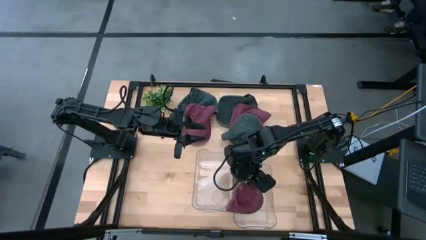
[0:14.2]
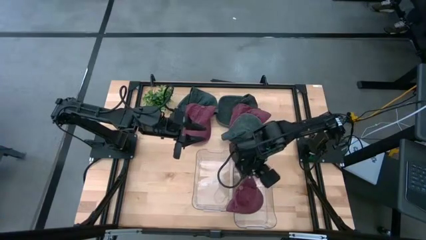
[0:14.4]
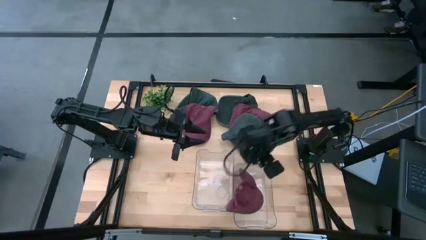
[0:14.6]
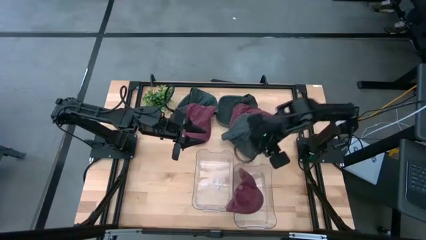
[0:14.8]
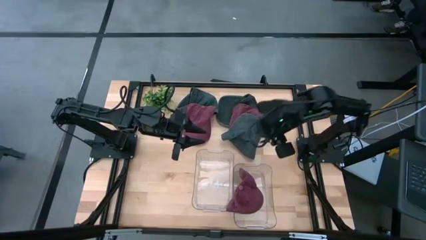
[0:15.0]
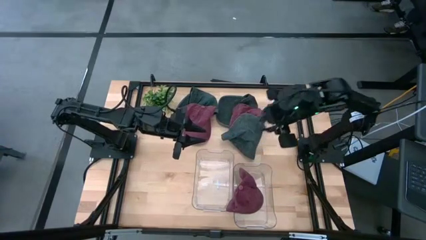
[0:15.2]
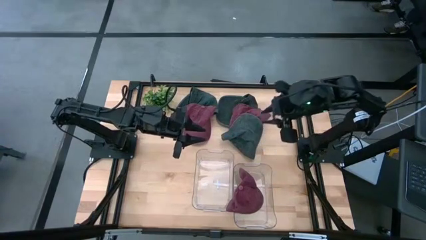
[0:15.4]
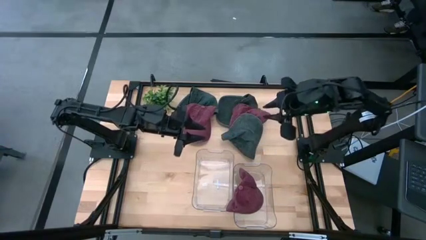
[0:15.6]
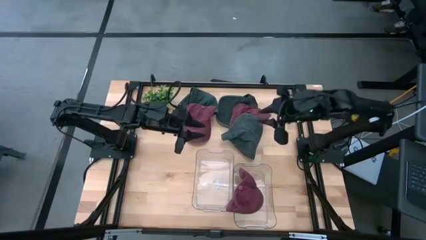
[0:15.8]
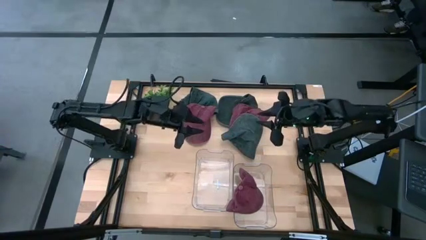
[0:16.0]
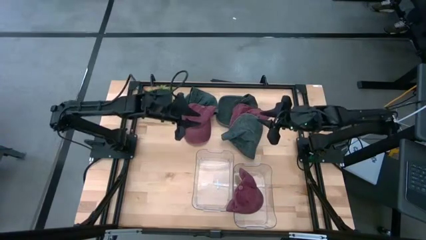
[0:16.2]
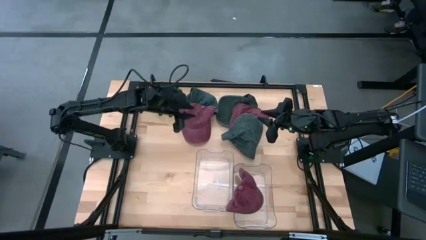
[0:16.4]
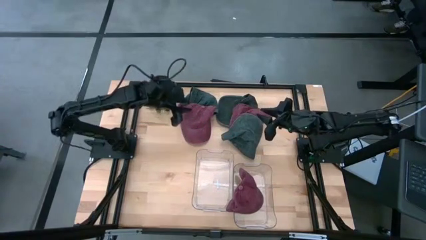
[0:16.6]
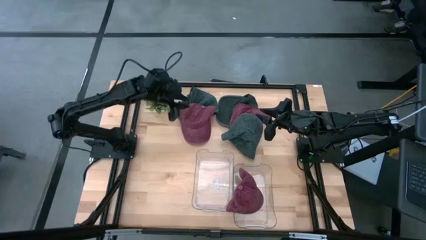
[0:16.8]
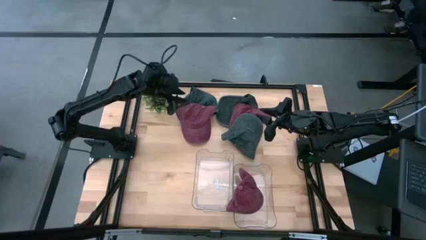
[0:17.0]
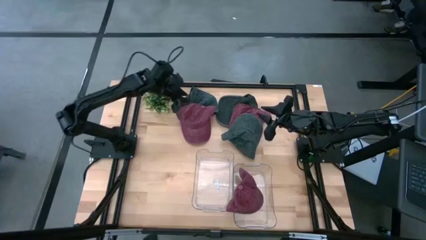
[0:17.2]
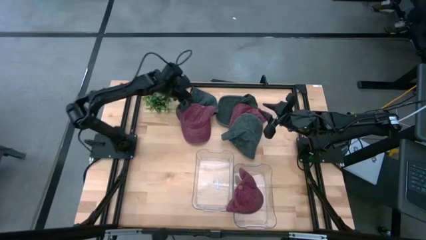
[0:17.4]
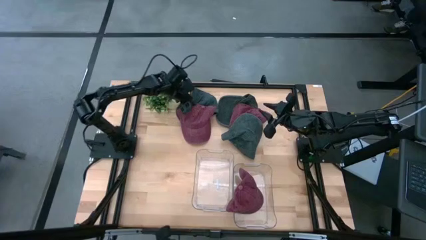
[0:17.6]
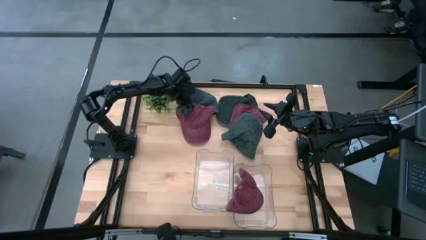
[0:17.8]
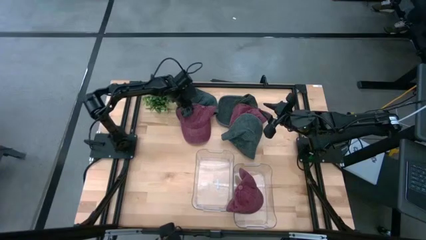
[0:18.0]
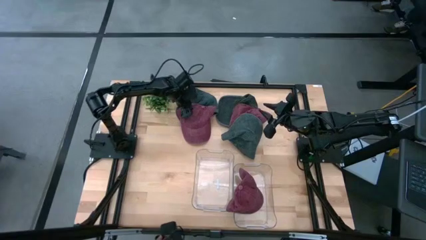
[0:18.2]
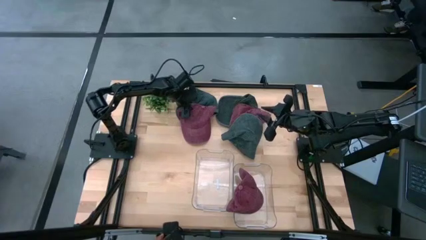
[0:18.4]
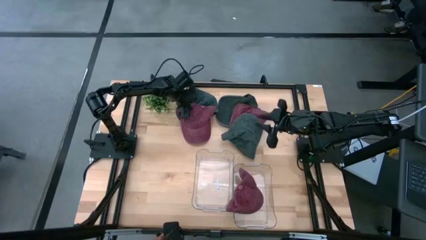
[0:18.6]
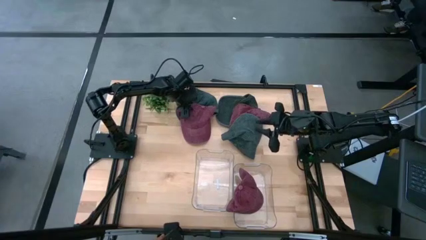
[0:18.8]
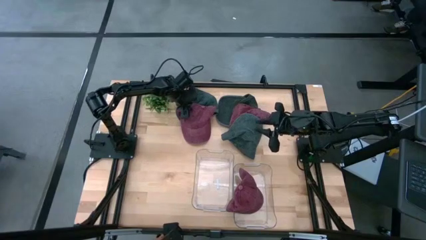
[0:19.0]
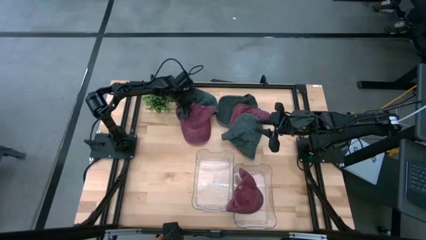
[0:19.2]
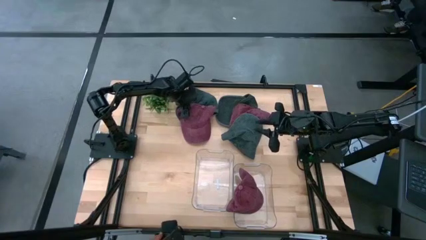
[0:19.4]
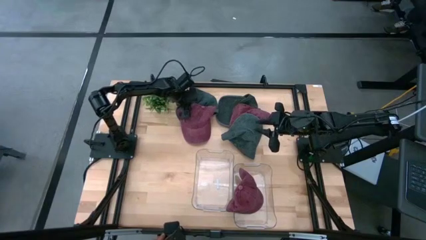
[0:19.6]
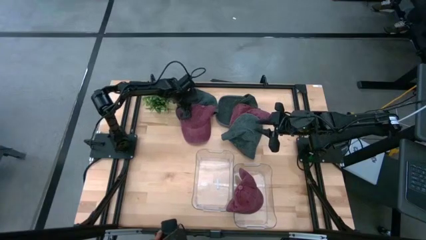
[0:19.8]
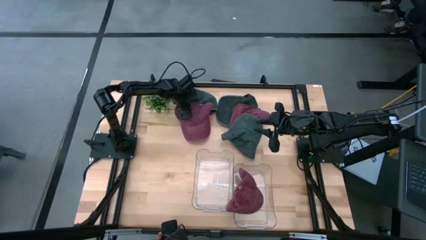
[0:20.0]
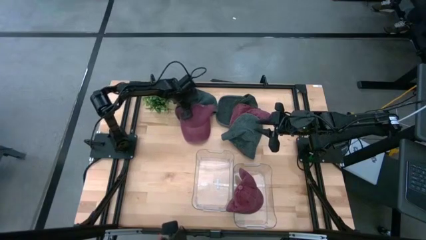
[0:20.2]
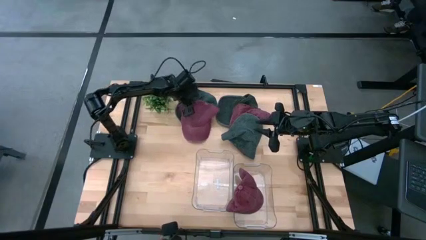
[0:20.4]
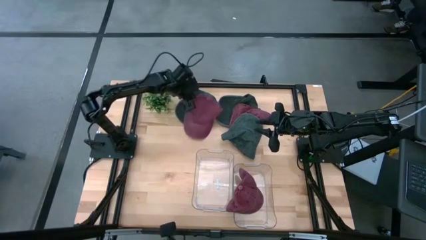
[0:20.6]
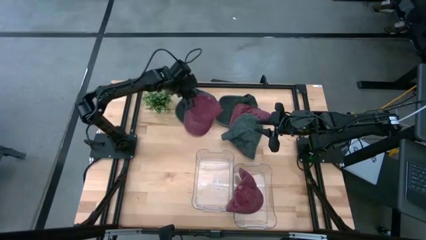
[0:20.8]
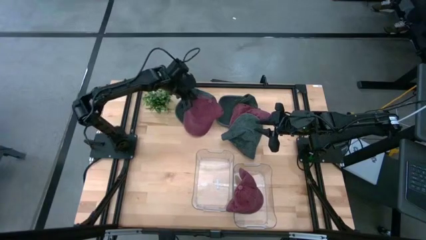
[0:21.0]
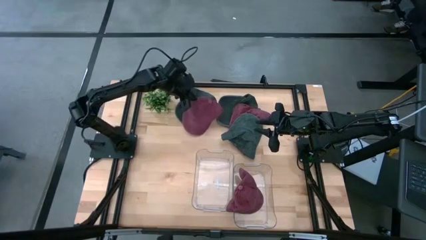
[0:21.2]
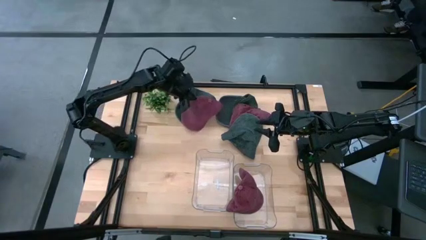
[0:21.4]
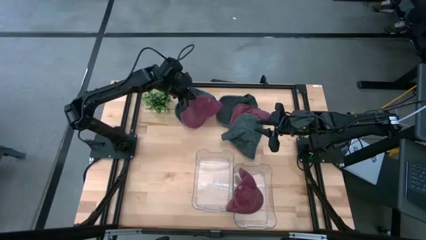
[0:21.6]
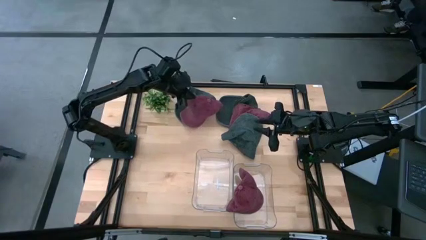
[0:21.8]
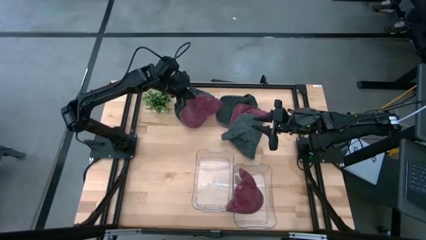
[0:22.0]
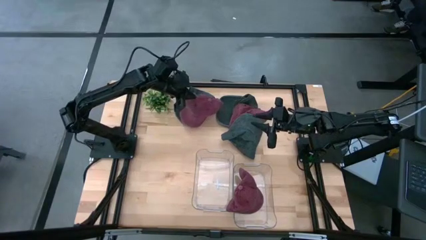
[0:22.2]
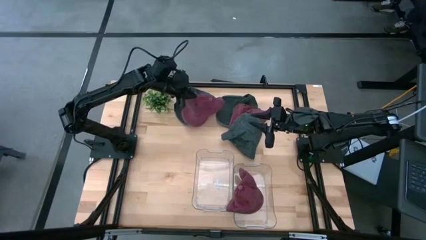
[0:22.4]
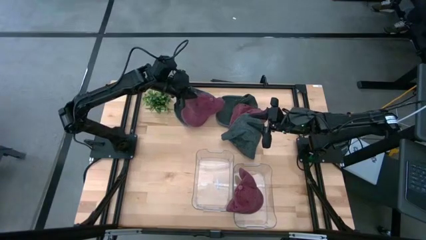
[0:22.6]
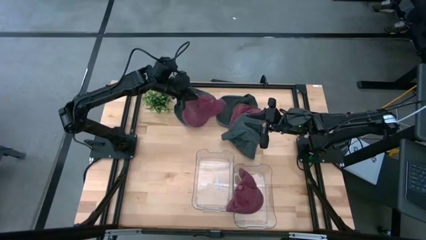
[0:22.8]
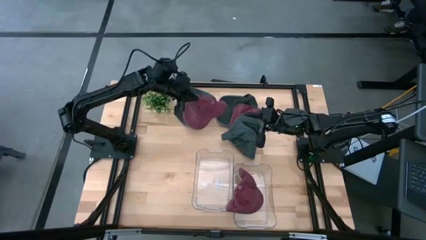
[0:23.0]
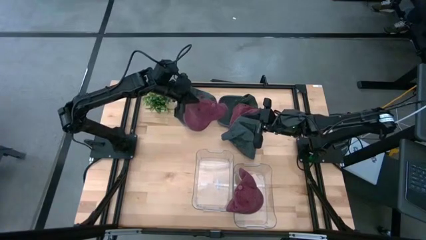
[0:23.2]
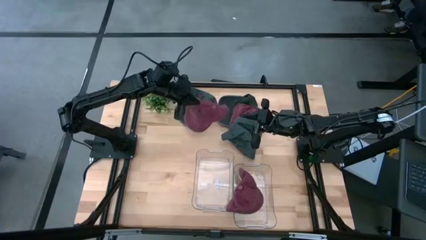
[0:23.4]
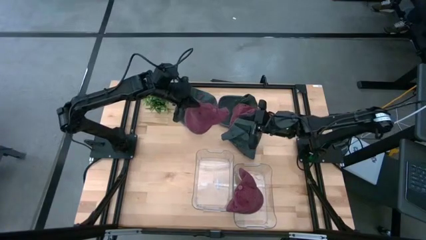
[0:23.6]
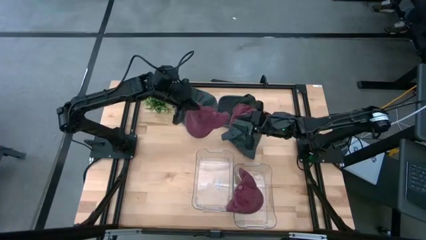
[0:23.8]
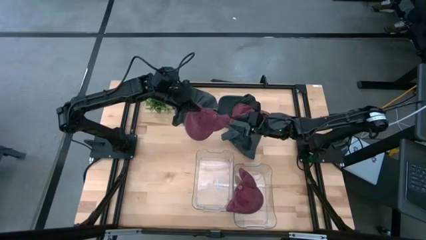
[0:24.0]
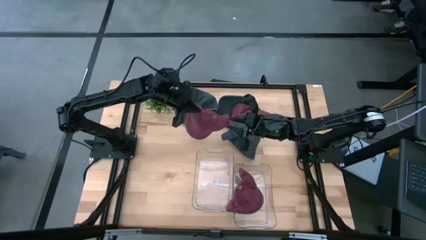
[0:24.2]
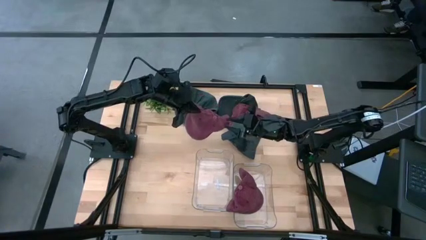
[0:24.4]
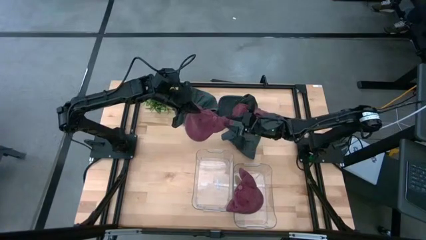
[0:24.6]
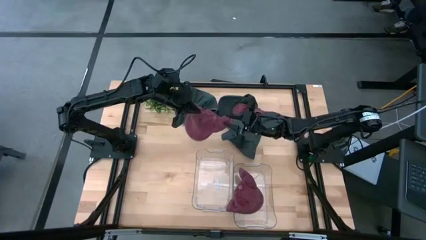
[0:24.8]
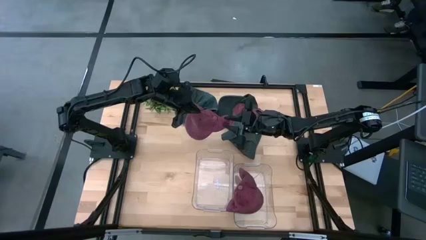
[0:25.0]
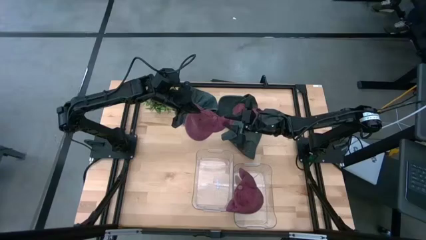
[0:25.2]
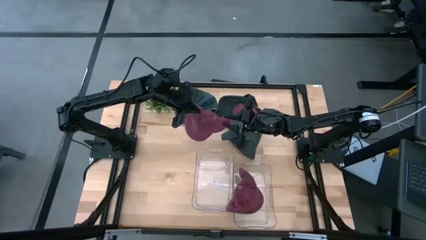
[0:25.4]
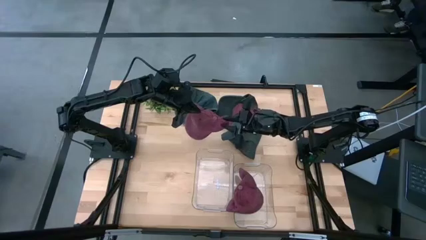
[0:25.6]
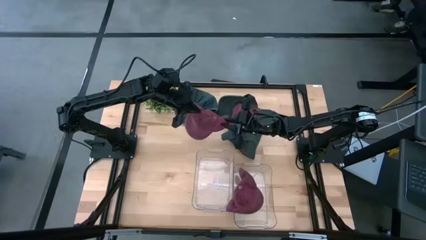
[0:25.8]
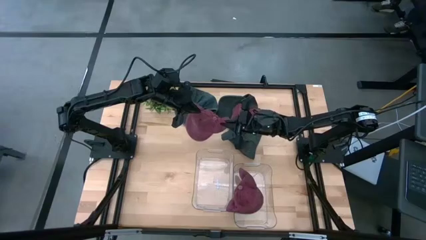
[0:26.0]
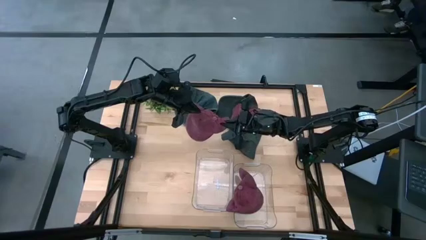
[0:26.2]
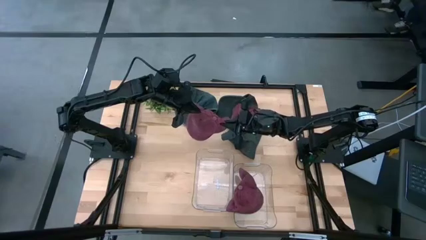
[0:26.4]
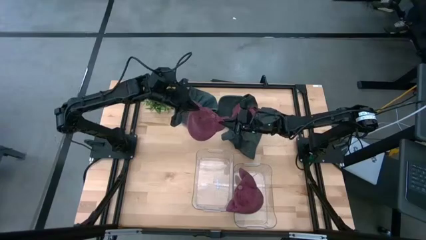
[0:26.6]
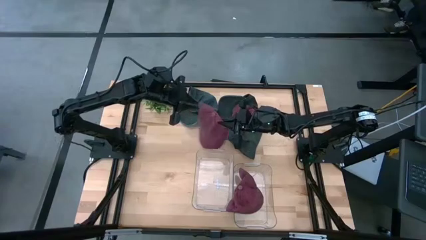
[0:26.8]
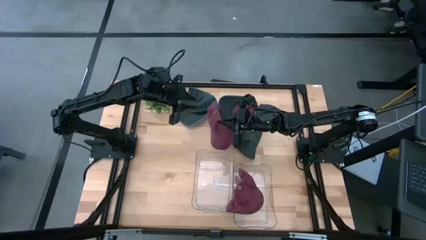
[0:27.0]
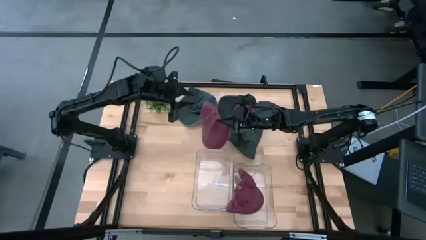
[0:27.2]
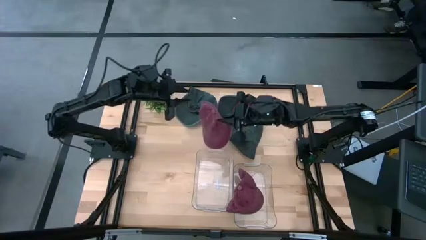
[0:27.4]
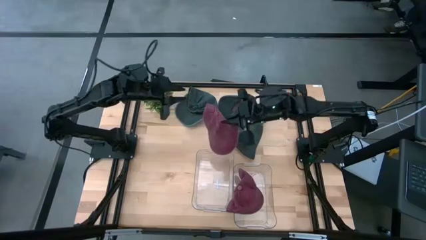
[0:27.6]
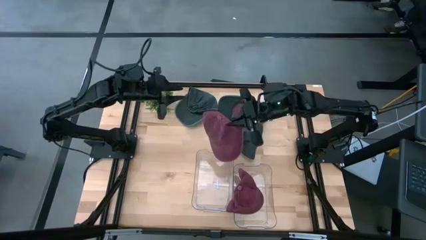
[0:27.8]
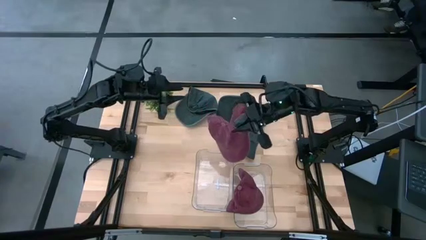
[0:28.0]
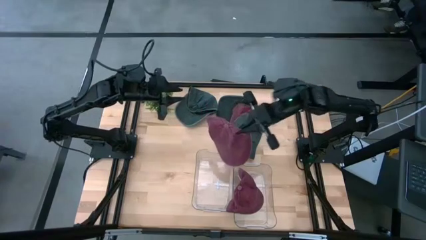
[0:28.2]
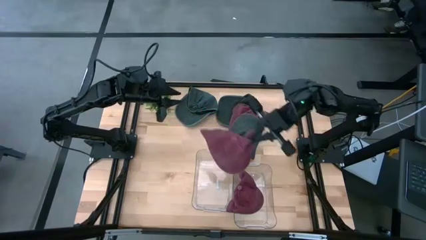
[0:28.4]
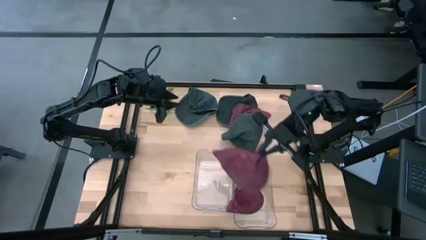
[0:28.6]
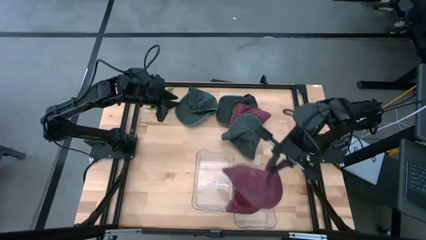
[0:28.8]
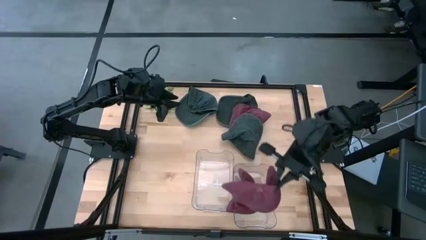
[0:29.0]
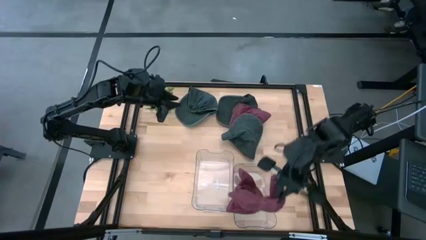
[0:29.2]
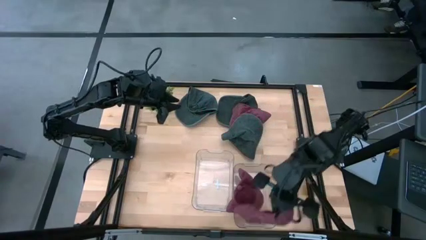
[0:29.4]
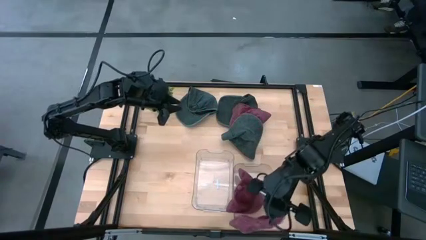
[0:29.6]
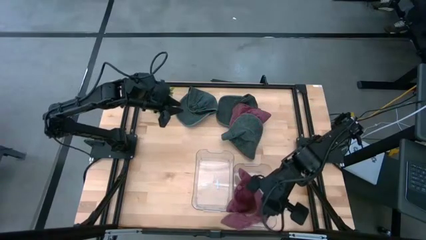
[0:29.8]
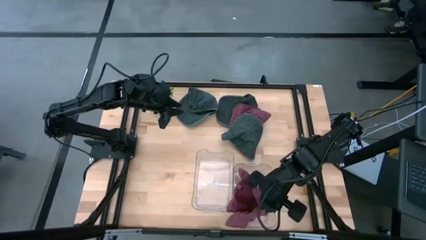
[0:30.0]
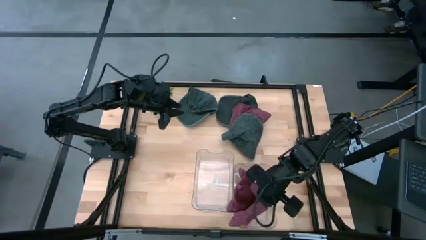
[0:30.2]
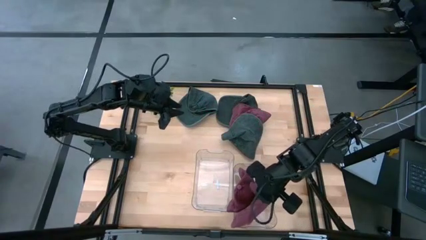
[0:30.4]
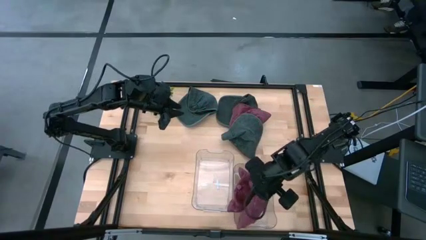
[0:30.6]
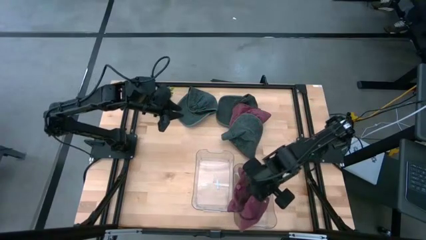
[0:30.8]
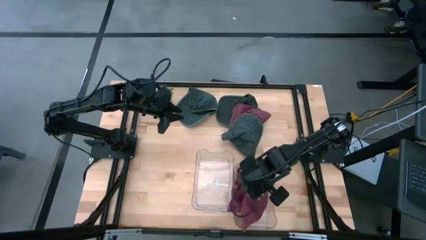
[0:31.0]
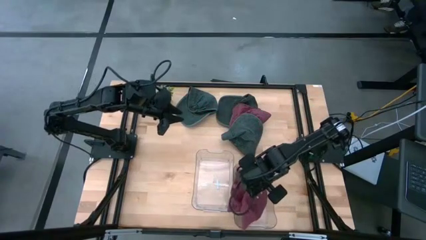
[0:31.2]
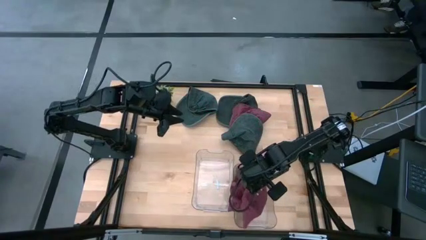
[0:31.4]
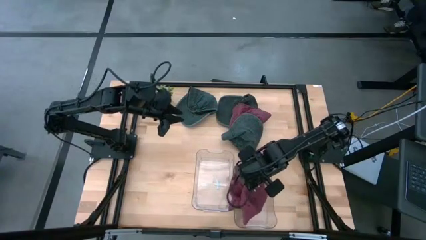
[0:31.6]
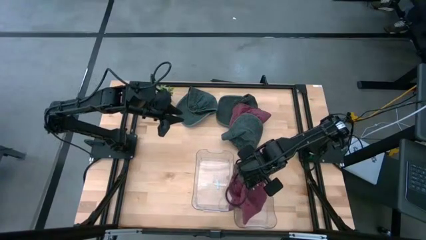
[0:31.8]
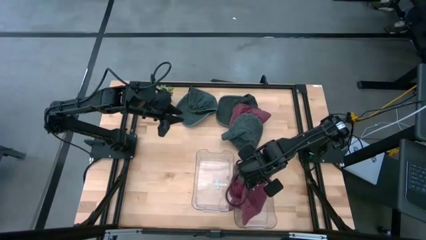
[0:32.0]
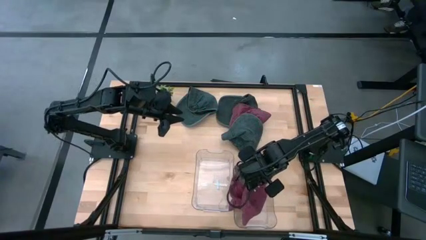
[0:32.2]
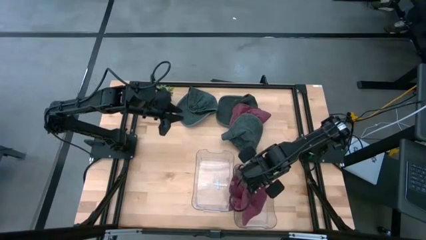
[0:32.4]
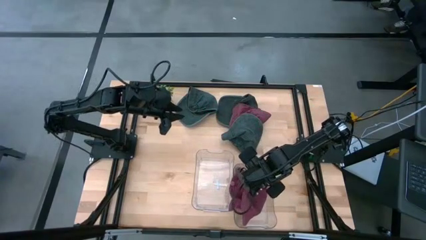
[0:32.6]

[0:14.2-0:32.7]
Task: Pick & Place hat
Put the left red cap into the right transparent bin
